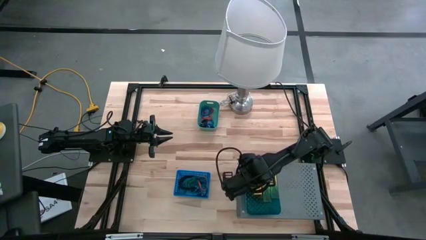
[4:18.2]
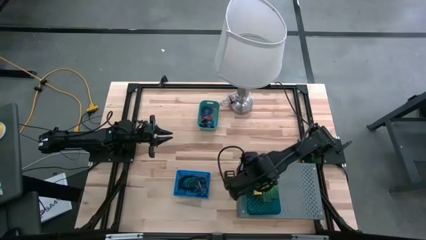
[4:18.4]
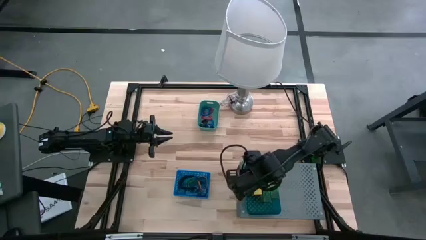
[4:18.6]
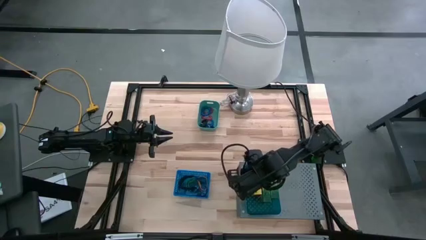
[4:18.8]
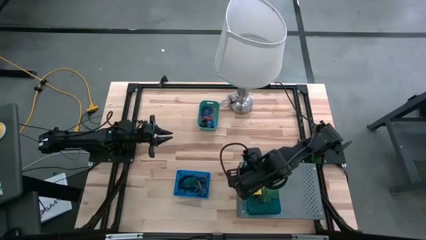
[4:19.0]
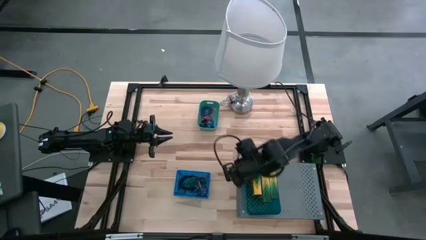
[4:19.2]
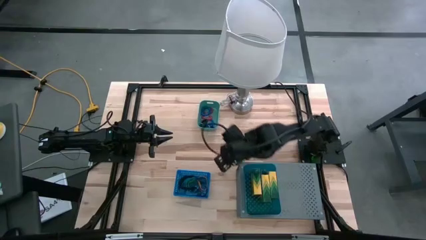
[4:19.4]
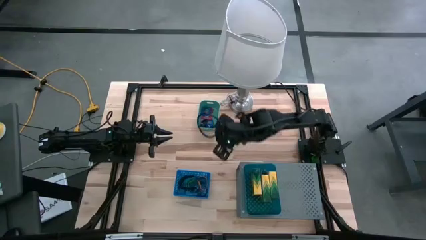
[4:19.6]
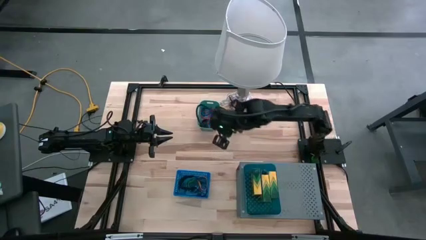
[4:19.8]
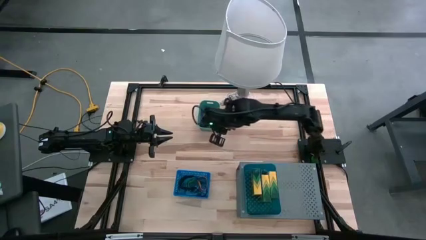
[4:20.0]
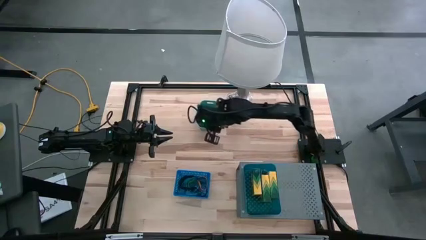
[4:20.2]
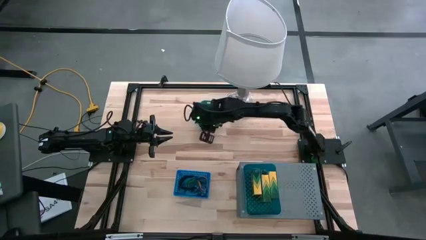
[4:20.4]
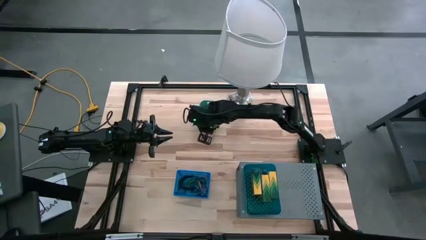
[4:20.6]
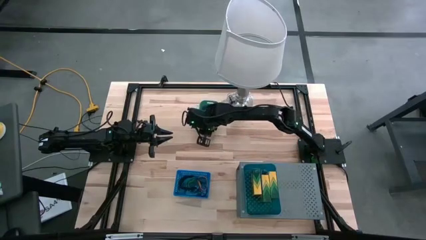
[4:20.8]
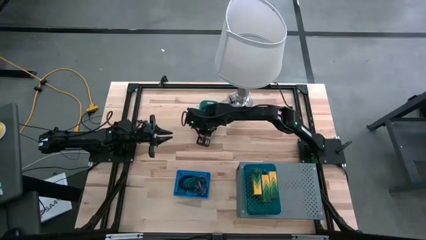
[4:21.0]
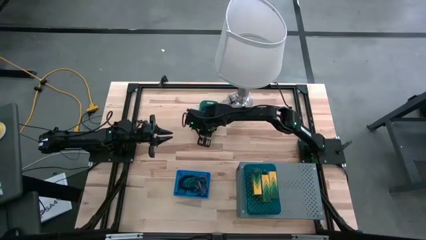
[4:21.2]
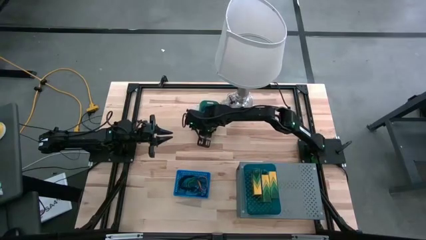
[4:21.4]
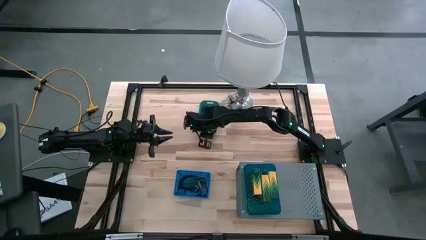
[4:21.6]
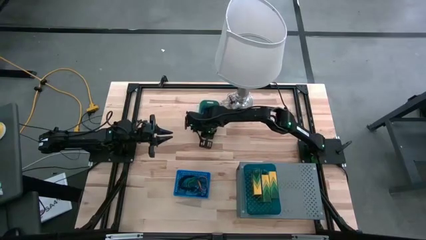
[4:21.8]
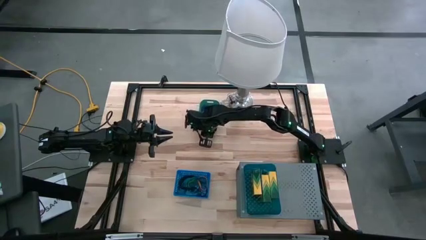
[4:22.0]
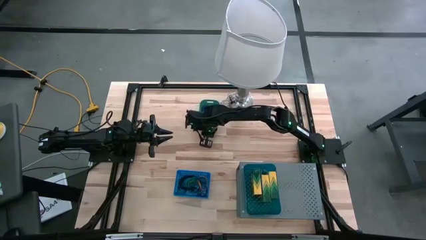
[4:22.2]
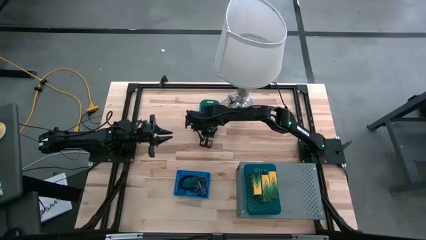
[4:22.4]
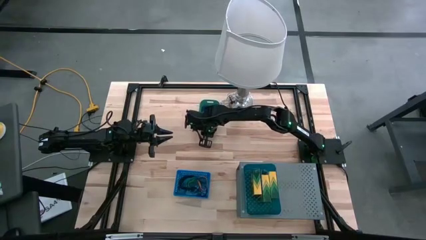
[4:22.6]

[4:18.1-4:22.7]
Task: Pick & Place Office Desk Supplies
Put the green bin on the shelf

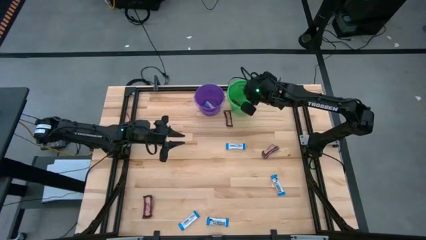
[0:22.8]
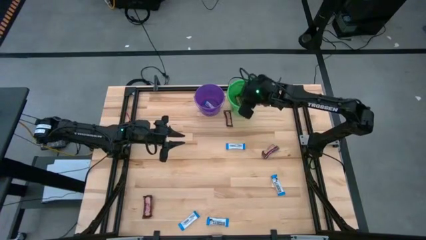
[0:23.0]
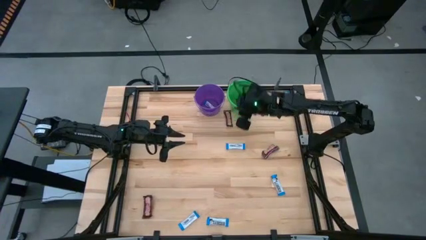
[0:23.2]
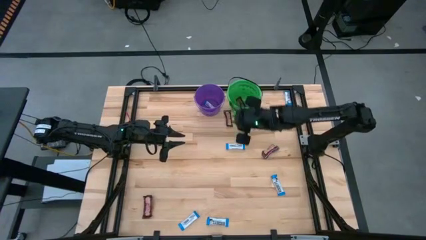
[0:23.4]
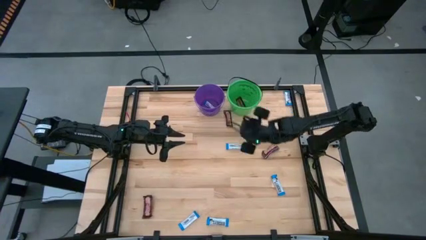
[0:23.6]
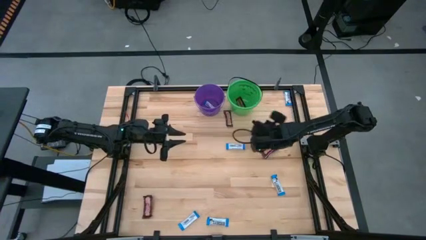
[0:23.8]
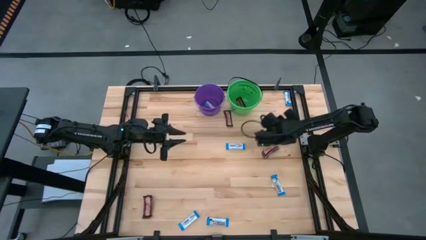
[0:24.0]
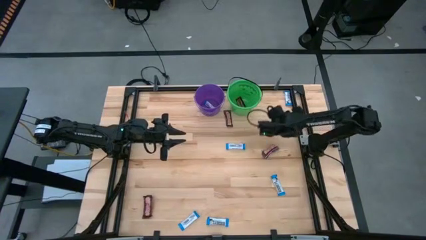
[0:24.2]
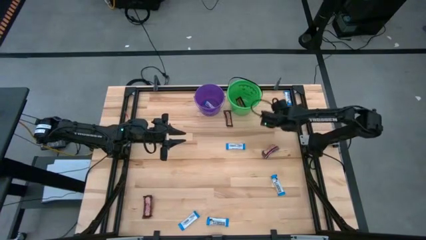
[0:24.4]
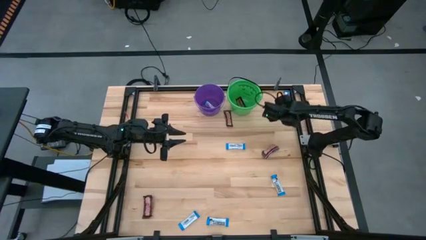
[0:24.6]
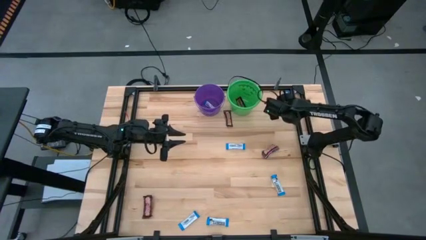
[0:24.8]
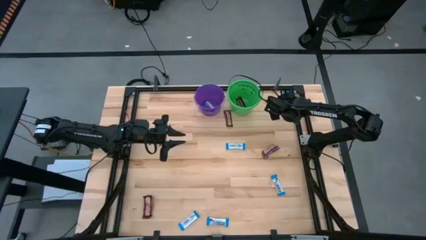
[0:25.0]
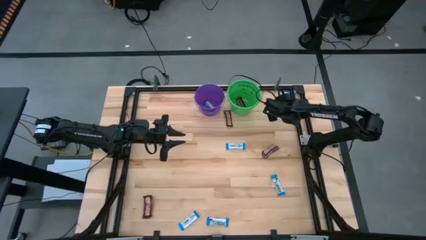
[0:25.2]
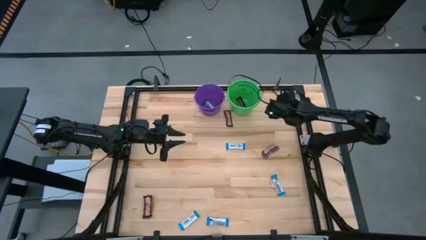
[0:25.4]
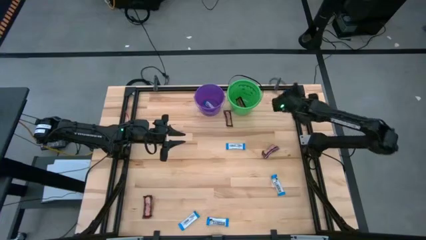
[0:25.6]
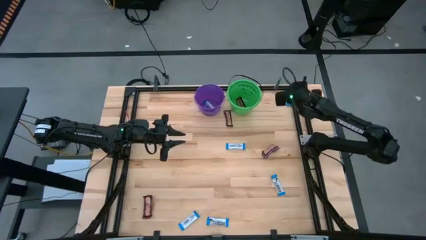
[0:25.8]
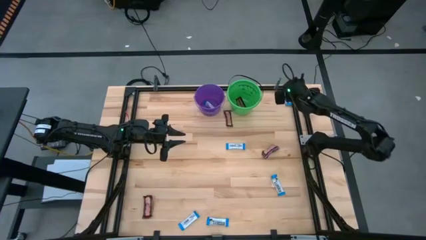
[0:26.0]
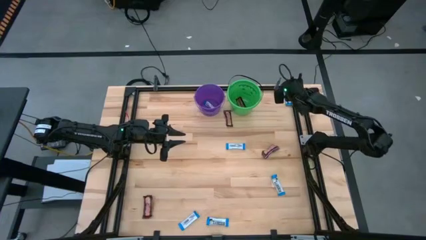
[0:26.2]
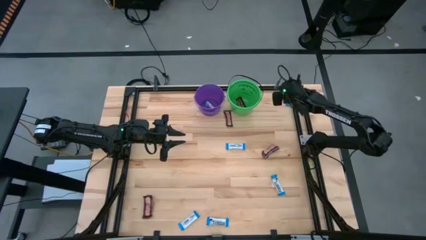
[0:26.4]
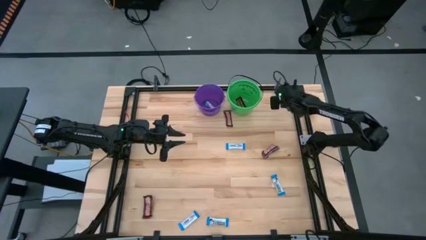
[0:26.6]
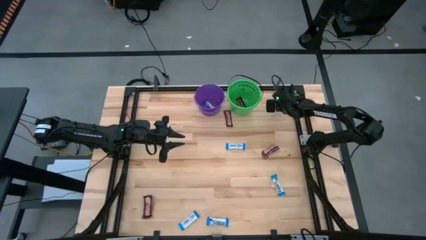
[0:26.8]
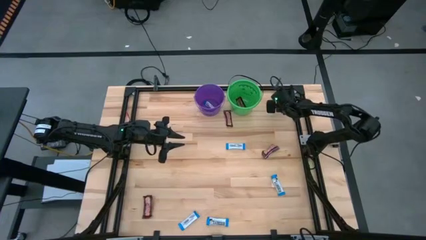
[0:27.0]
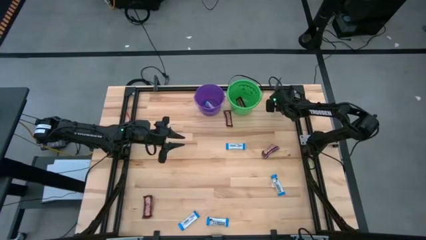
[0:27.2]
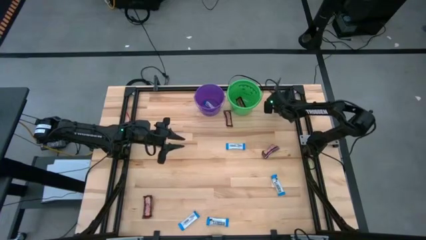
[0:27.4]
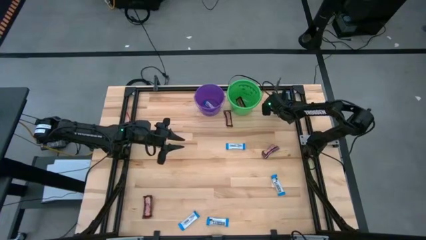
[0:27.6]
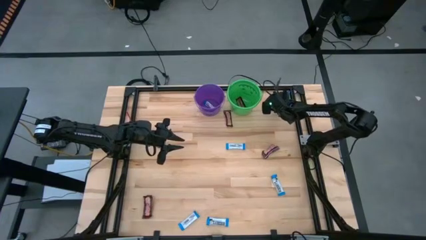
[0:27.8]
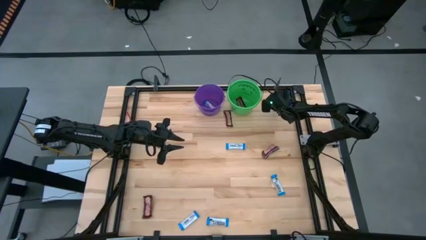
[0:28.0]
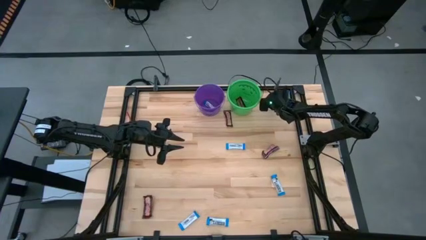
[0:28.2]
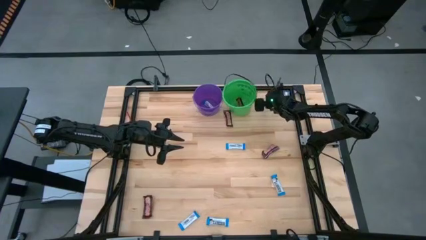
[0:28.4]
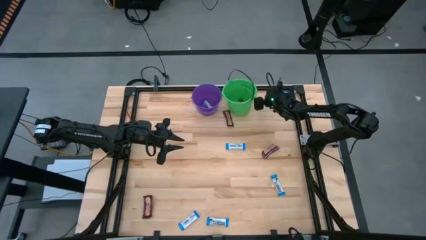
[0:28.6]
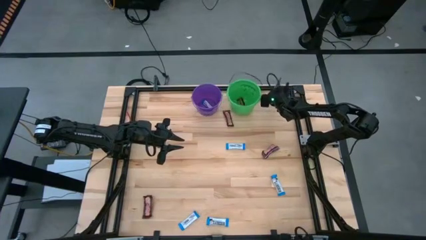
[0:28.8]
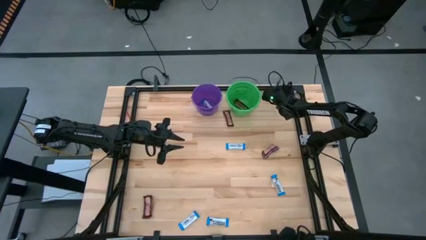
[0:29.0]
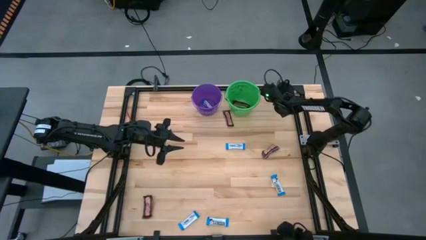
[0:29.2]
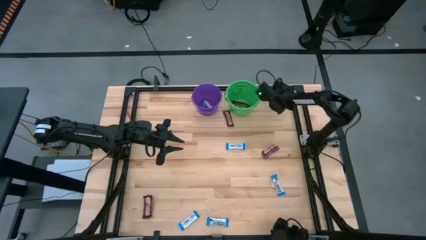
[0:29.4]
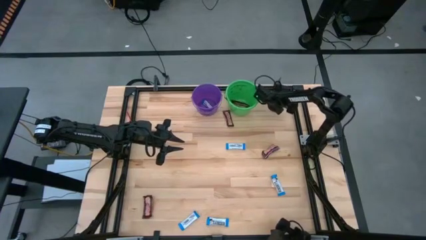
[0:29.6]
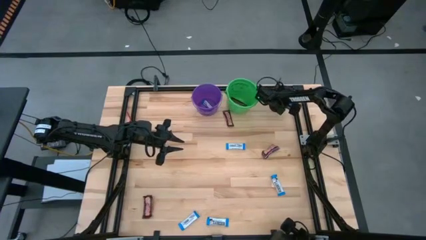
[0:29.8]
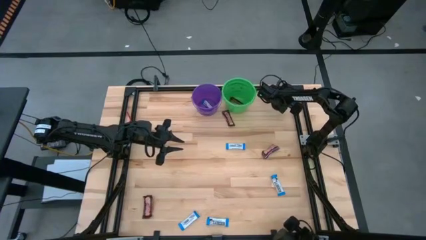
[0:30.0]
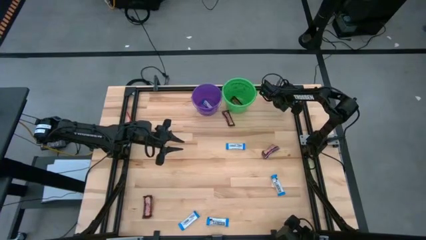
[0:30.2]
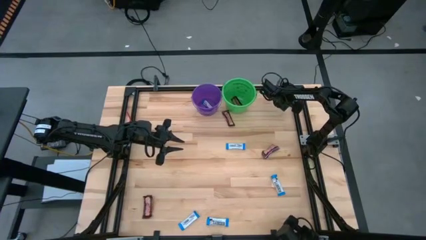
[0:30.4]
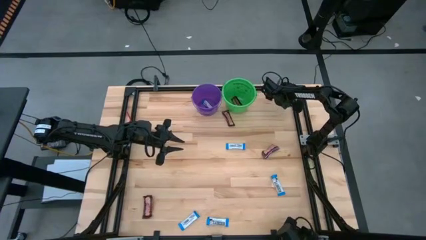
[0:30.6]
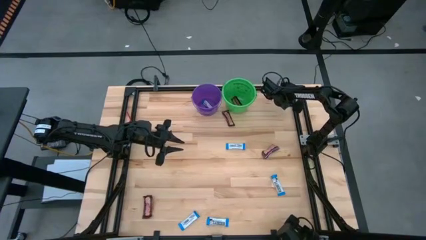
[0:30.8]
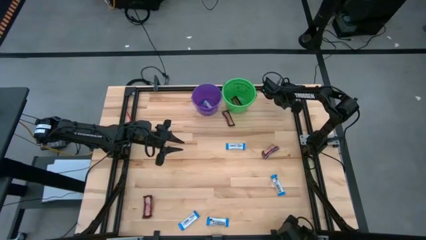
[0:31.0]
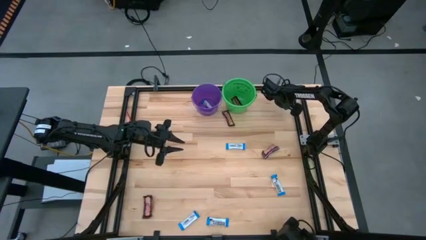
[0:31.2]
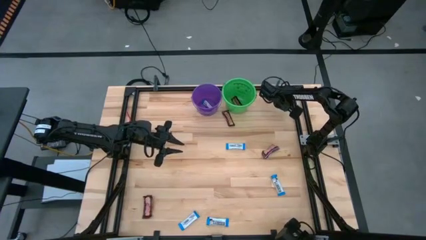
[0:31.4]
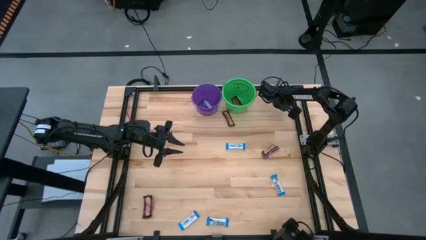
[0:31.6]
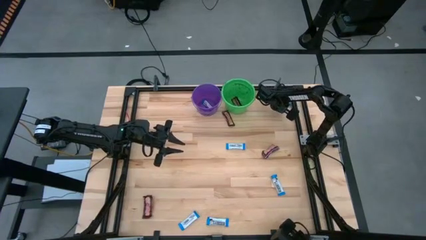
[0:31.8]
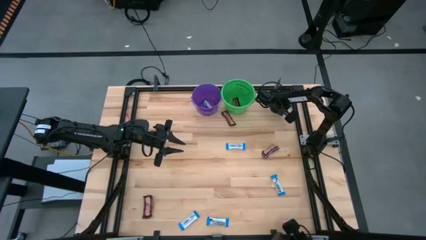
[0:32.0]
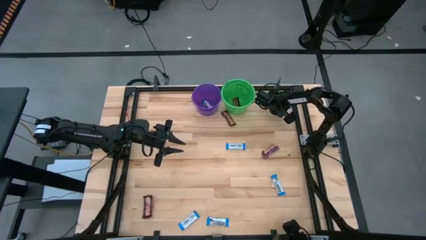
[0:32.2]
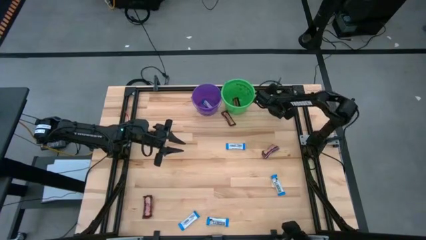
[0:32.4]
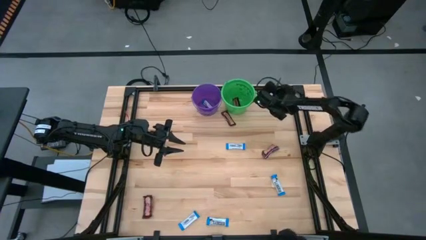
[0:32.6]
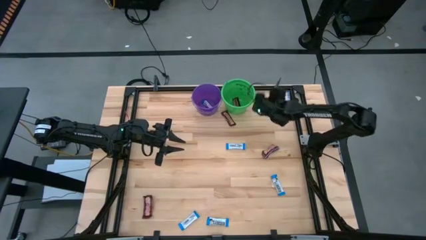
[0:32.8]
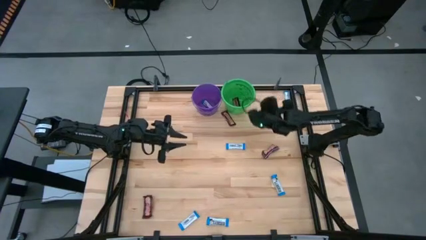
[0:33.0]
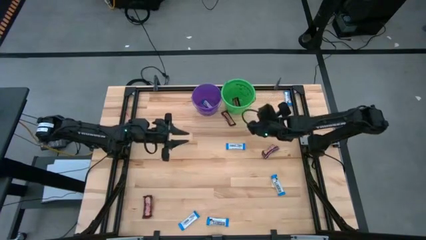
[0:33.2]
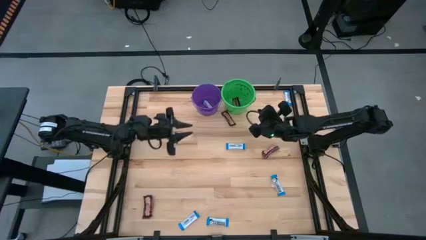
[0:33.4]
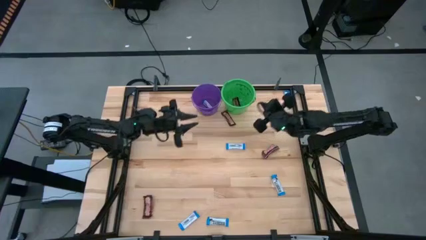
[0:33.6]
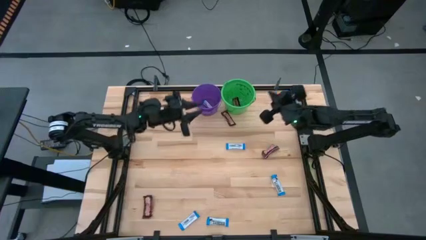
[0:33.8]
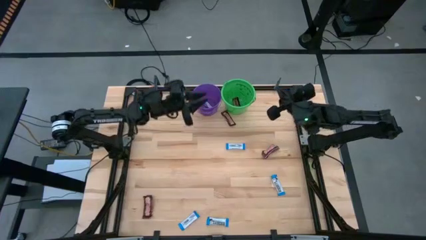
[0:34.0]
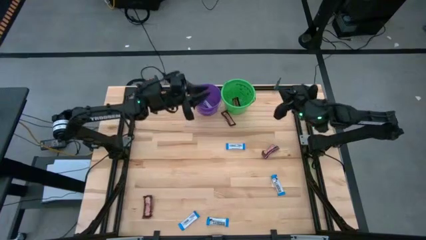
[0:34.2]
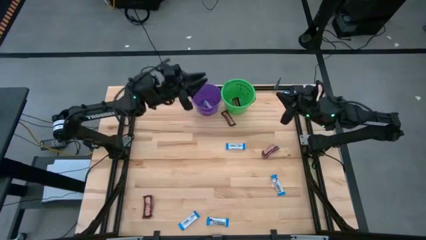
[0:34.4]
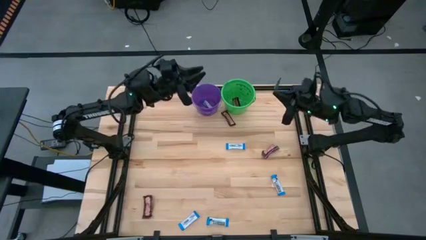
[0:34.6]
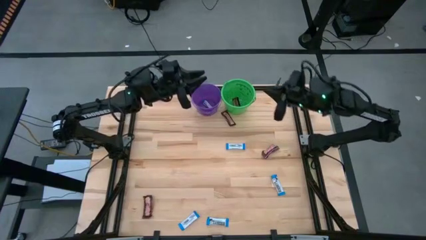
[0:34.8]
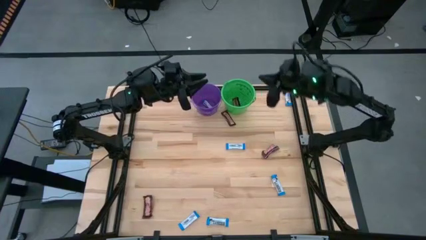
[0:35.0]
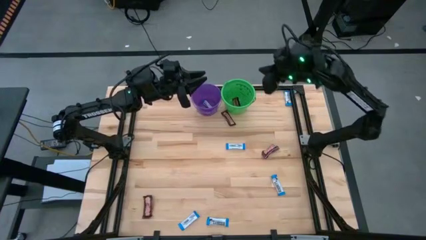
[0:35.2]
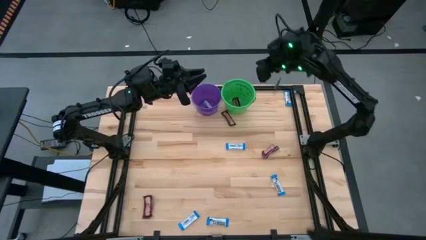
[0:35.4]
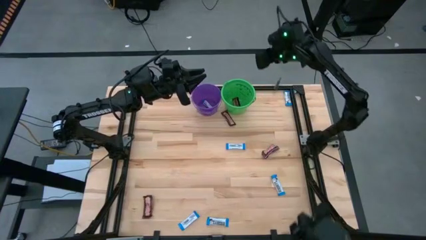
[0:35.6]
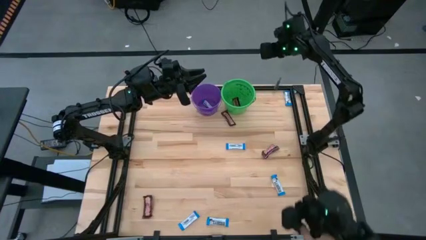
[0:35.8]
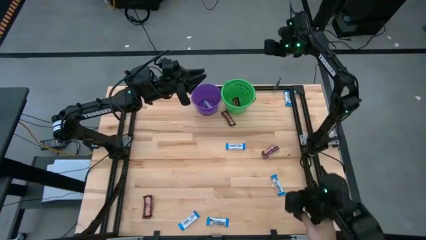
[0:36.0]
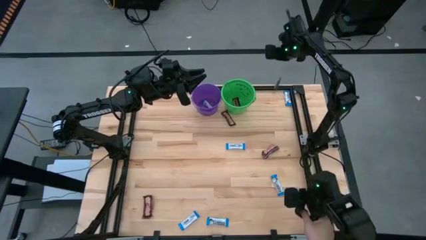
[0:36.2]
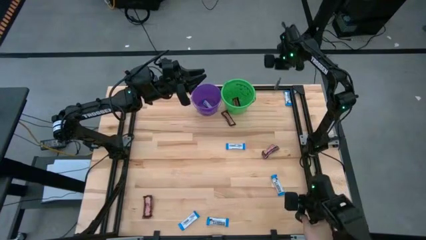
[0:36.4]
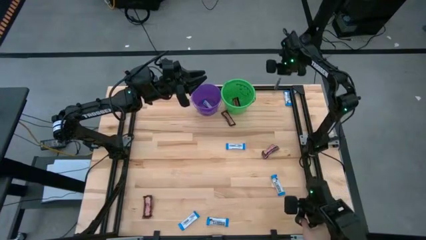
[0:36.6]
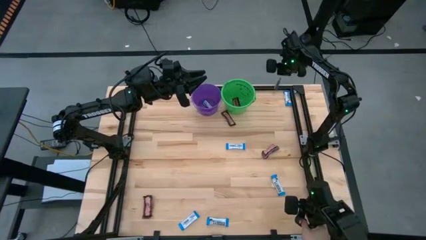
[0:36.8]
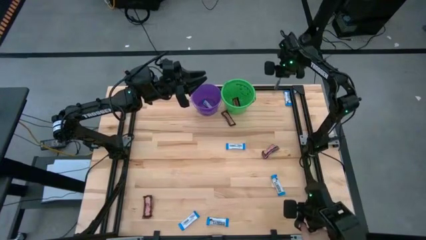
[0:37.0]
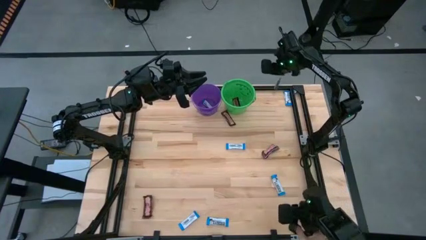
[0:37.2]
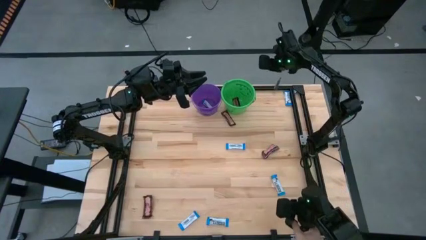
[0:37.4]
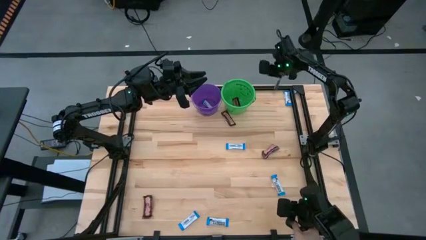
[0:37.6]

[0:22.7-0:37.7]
Task: Sort candy by brand, put in halloween buckets
Put the white chocolate bar into the purple bucket
